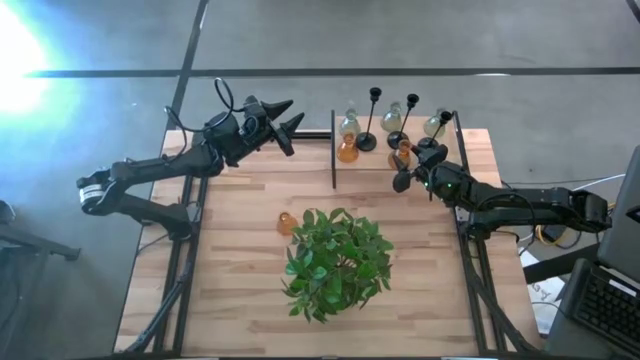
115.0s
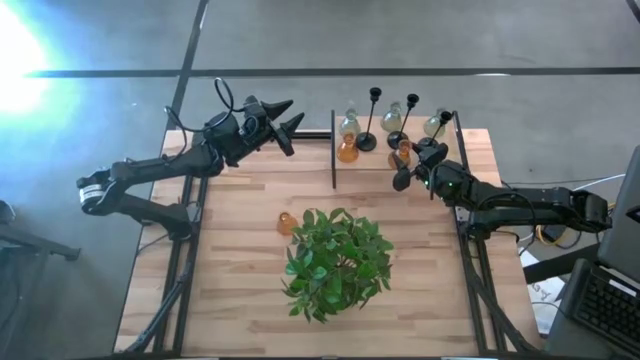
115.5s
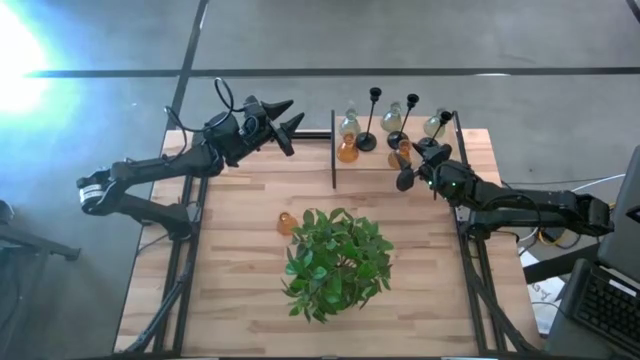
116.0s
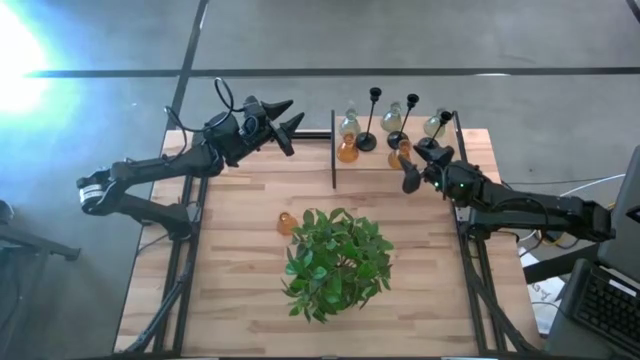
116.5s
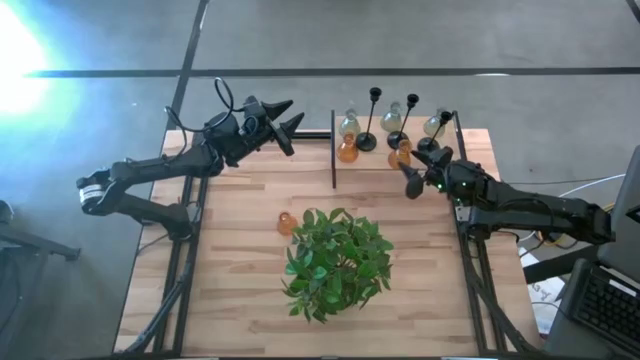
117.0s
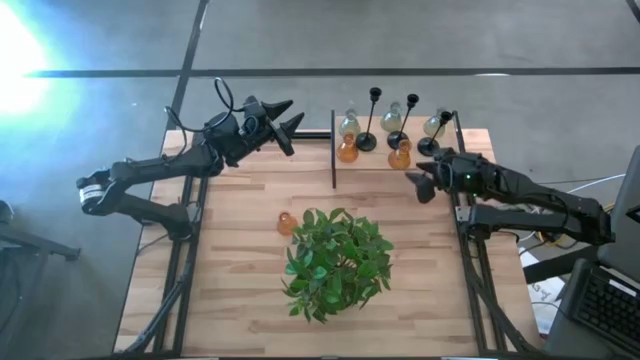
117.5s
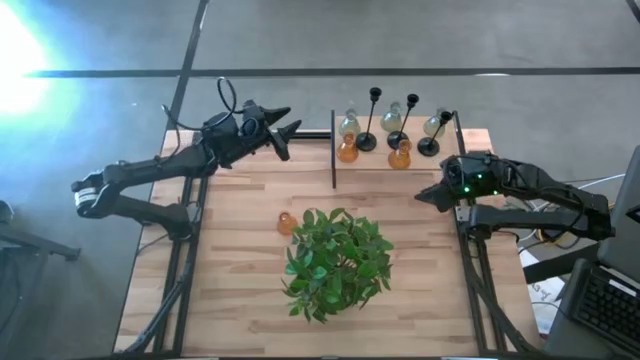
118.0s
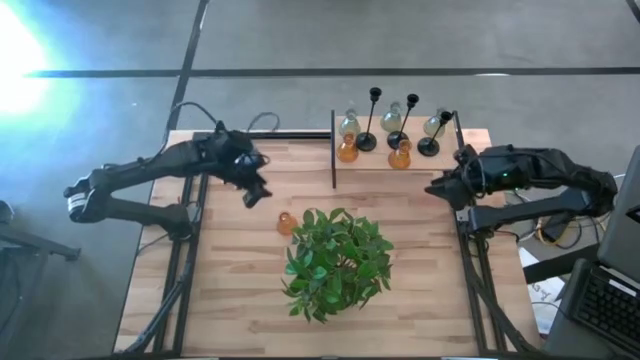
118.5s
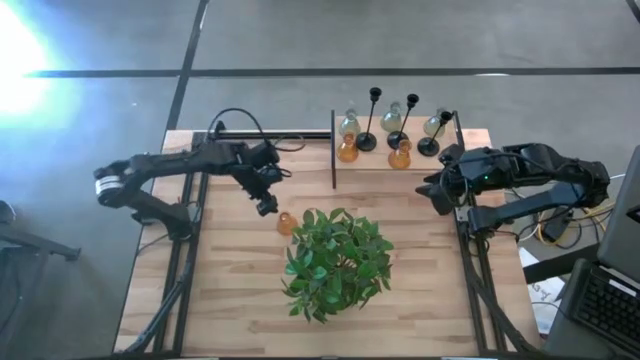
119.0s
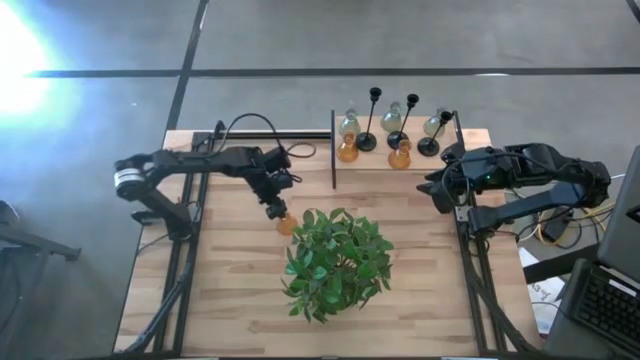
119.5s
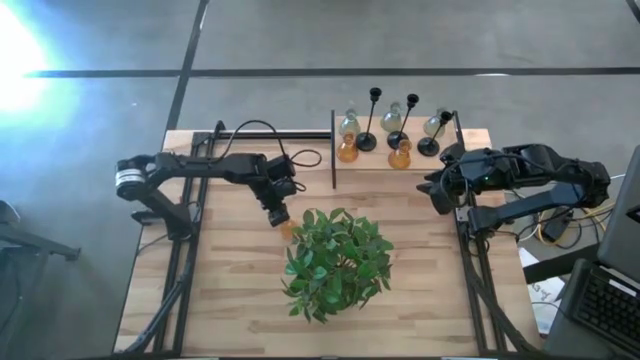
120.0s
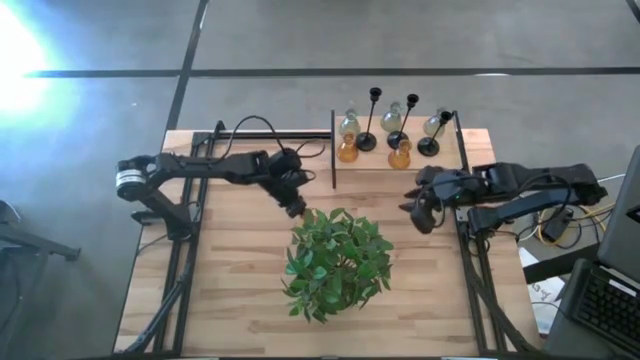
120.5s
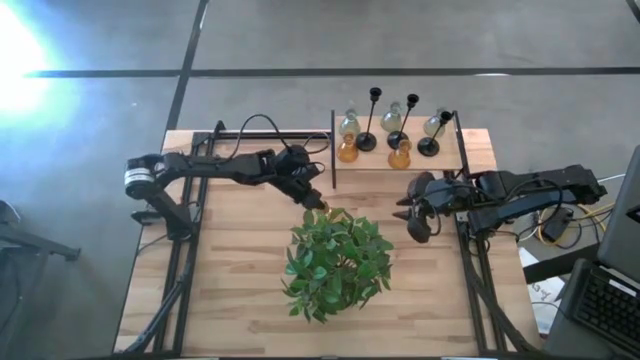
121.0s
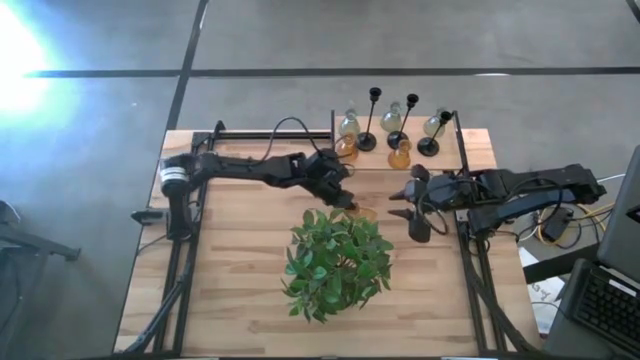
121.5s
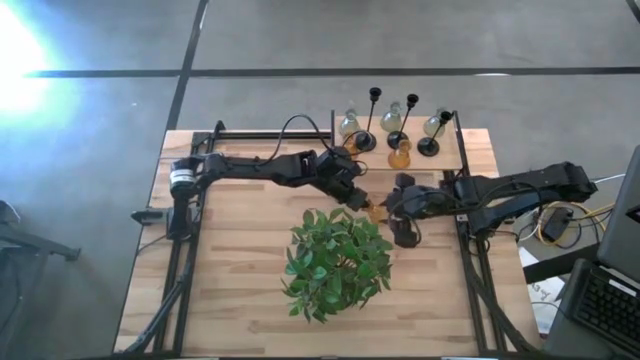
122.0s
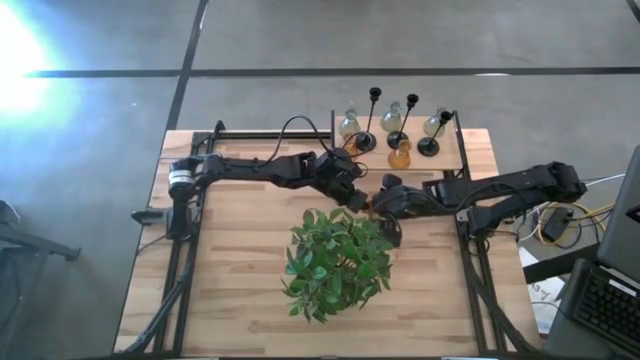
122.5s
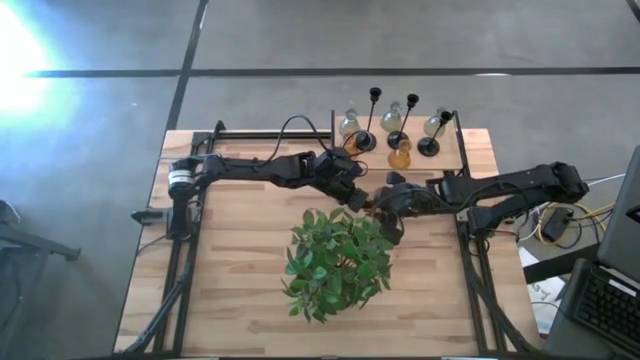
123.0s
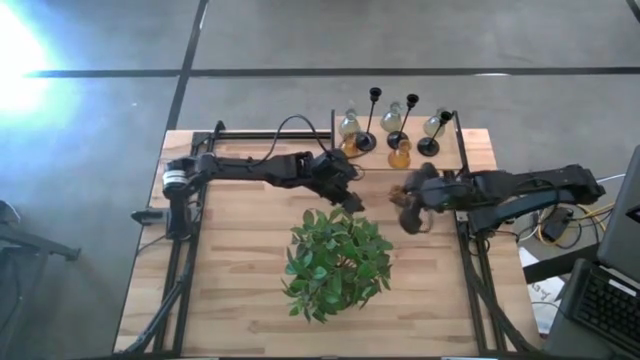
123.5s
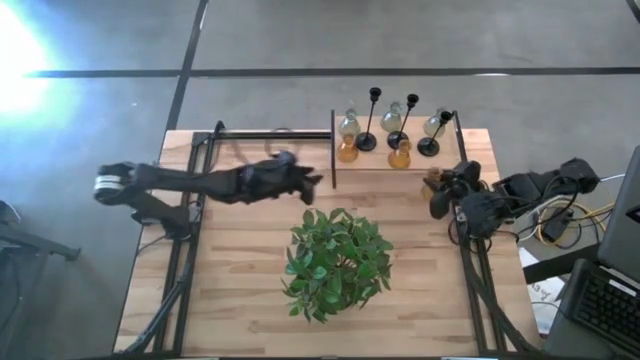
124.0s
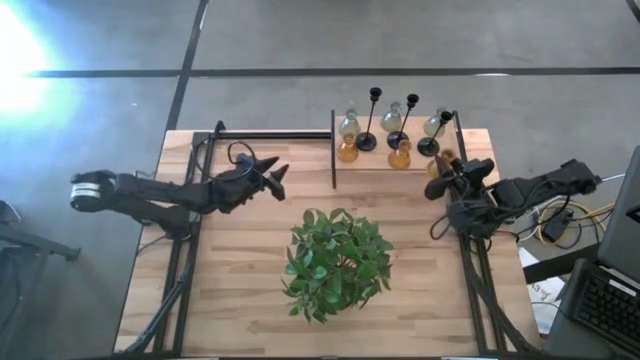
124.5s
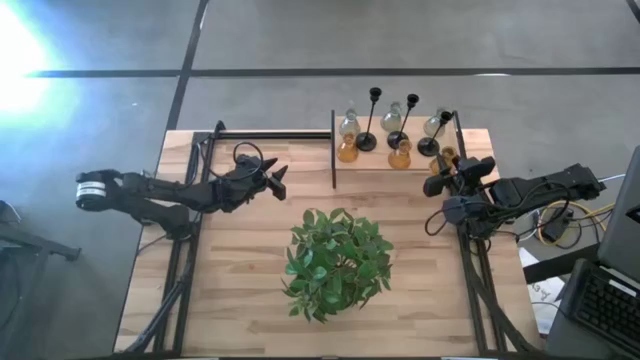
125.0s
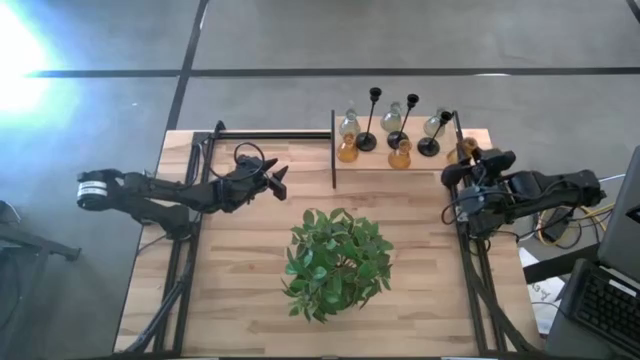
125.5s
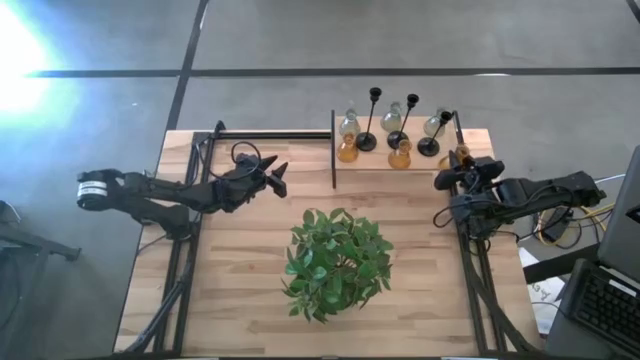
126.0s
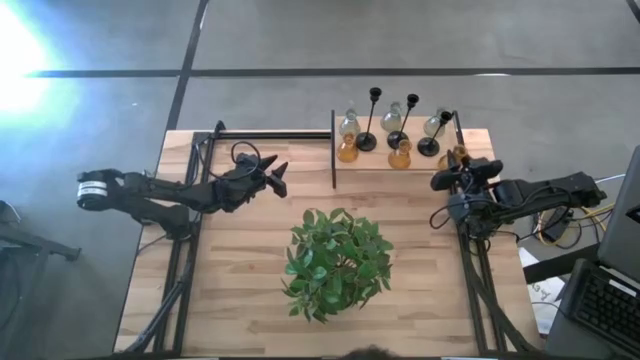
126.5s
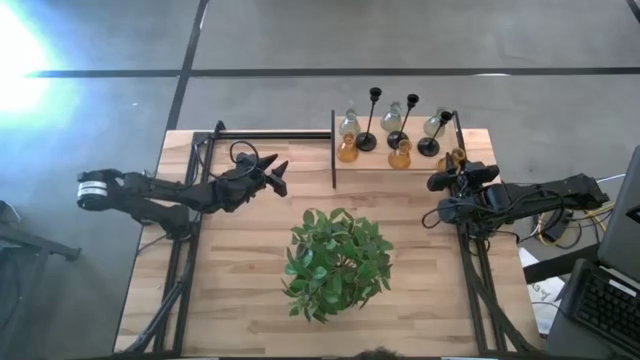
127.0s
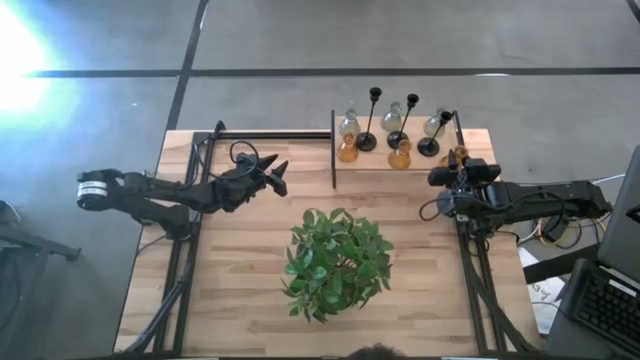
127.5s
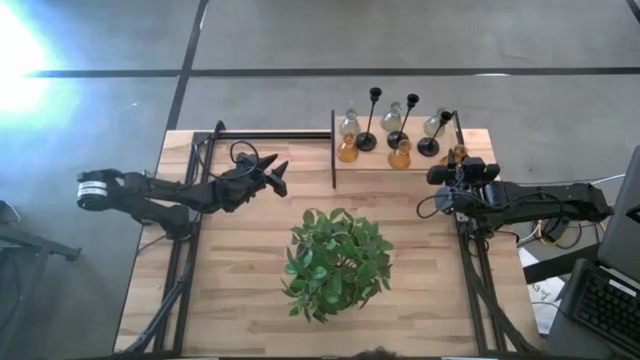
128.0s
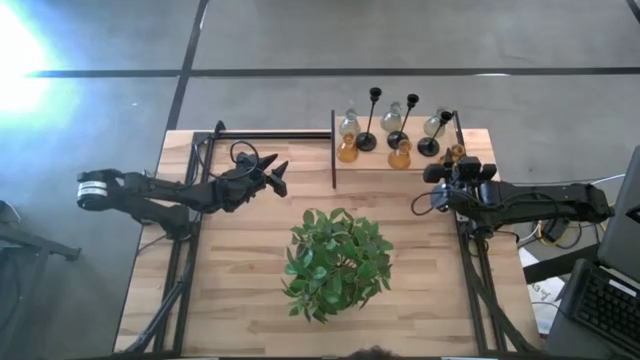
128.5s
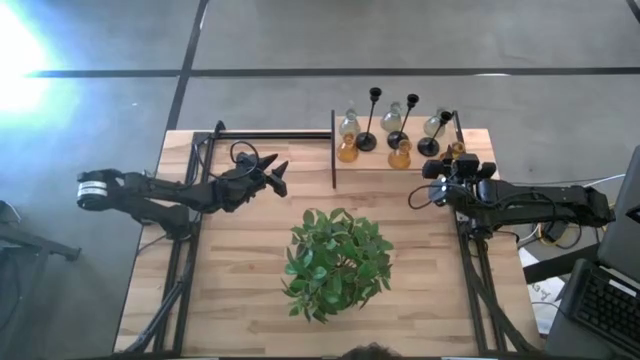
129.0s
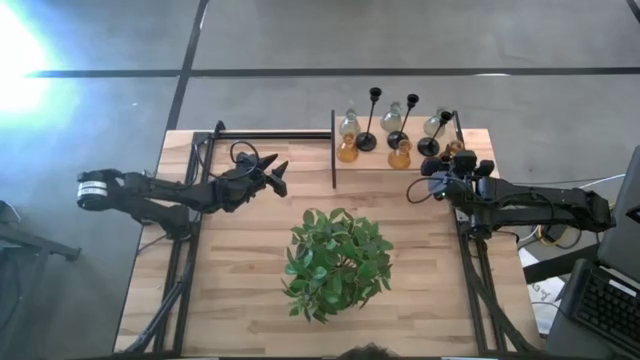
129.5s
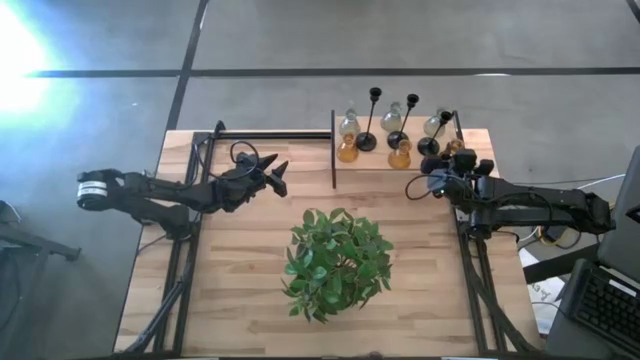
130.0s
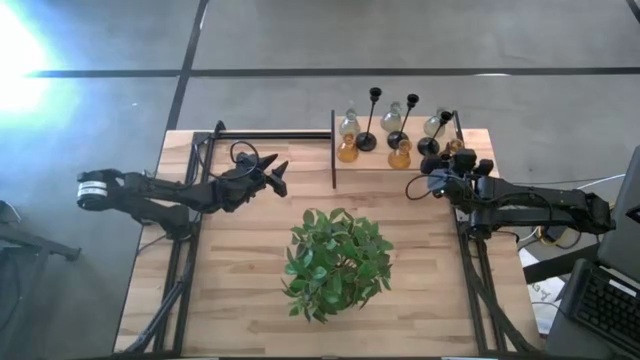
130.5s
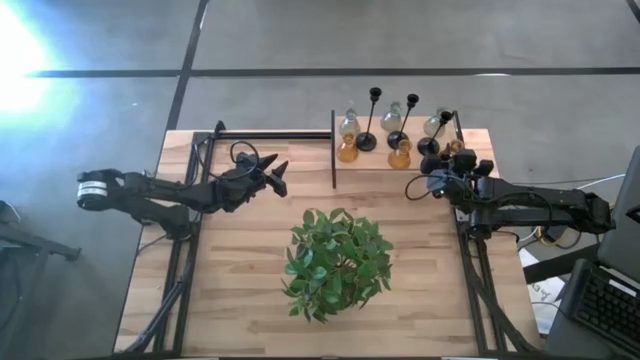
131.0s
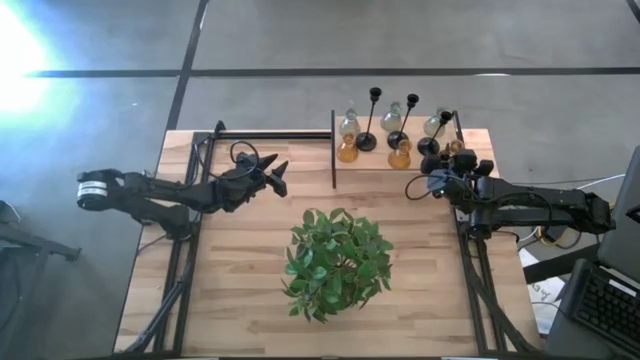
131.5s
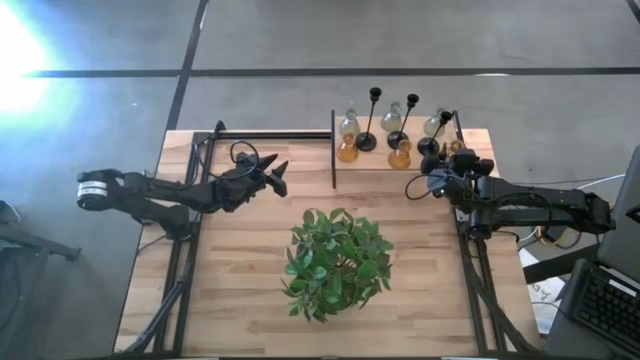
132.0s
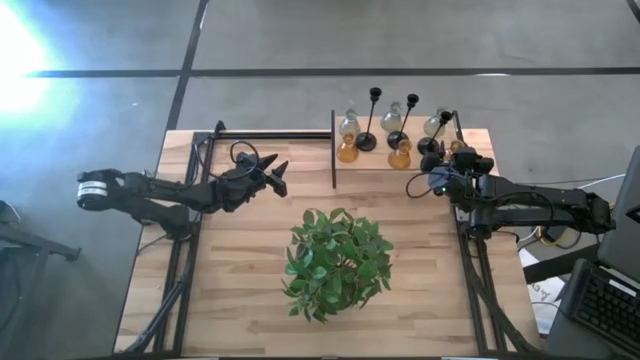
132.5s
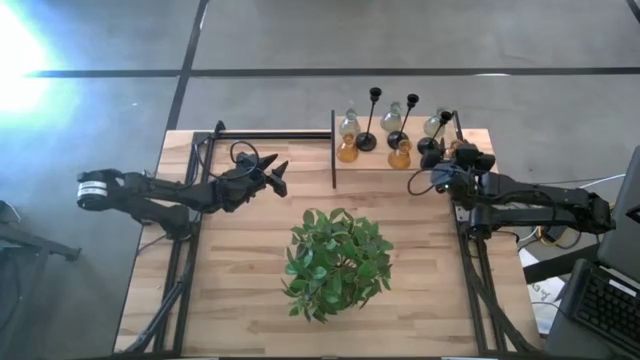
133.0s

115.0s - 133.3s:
Task: Pick & Place candle stick holders
Put the yellow glass candle holder on the shelf

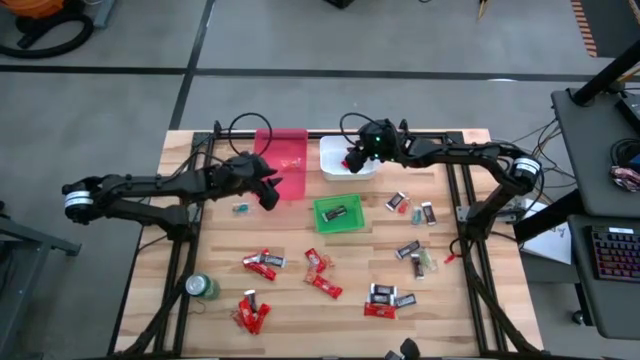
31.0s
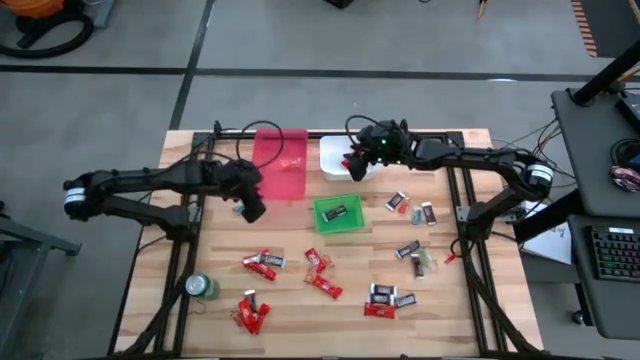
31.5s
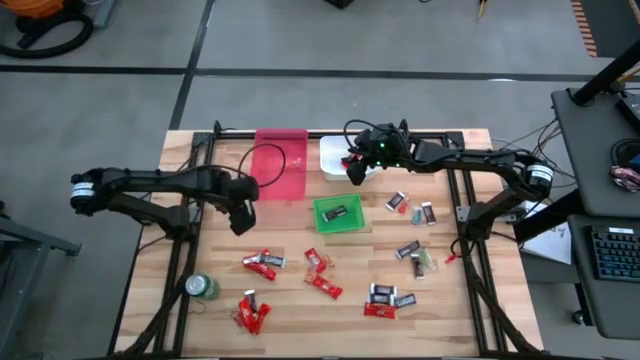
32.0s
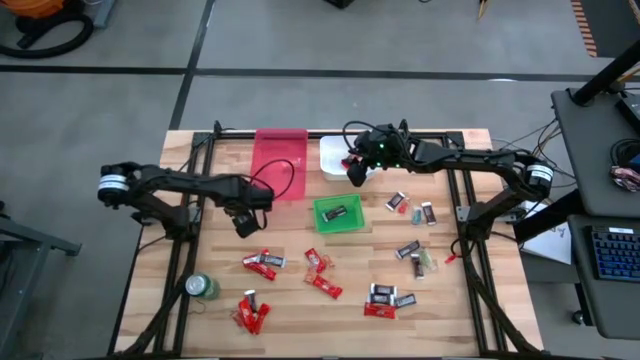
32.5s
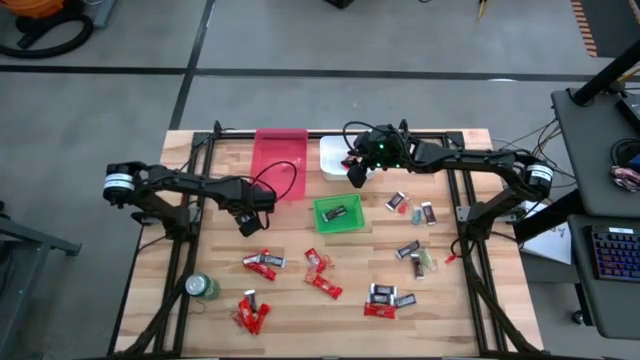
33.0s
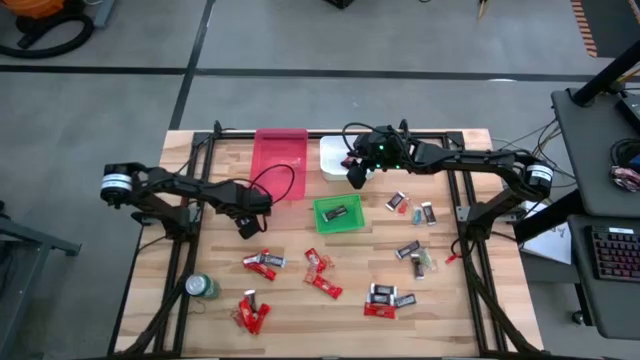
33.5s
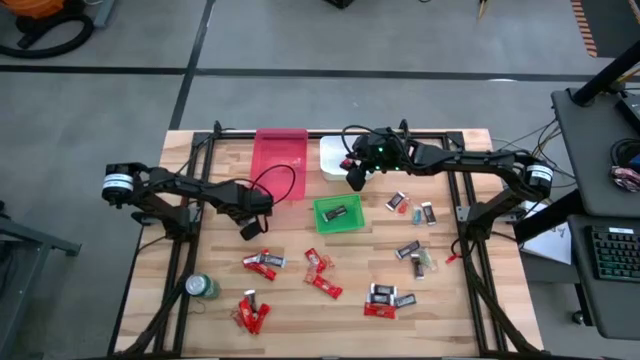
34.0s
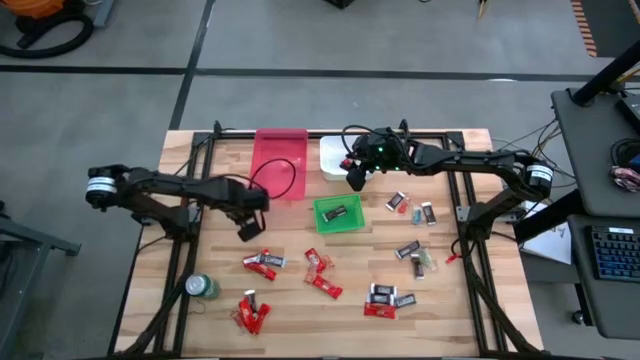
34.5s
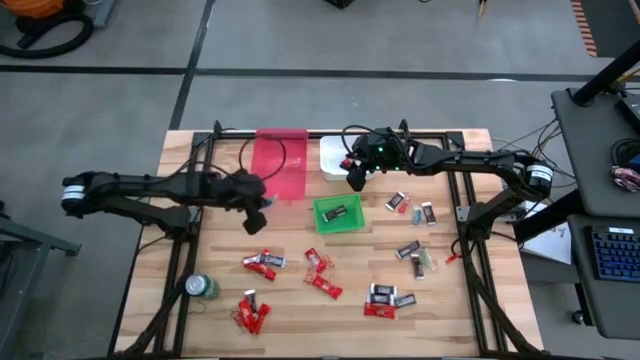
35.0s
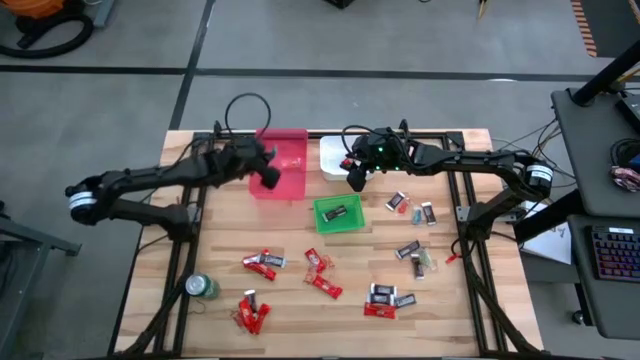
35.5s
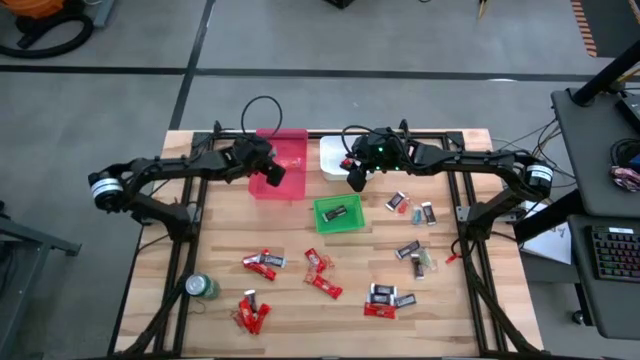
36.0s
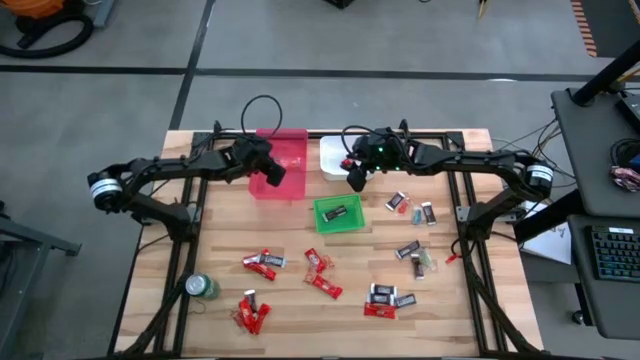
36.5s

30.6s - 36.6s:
Task: Sort candy
Put the blue candy into the red bin
